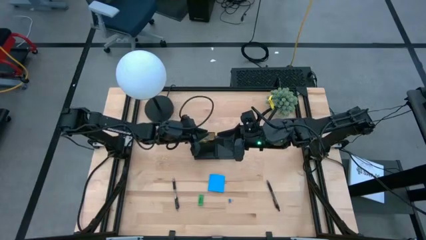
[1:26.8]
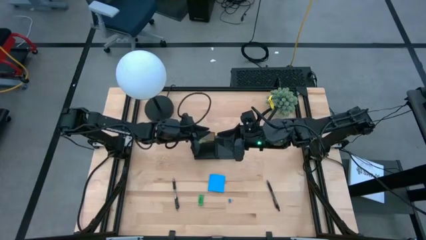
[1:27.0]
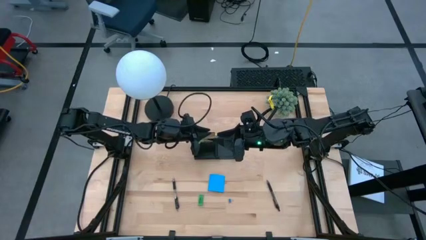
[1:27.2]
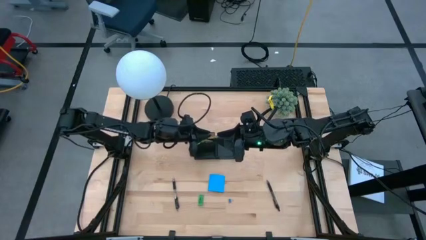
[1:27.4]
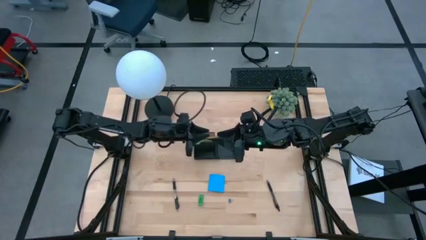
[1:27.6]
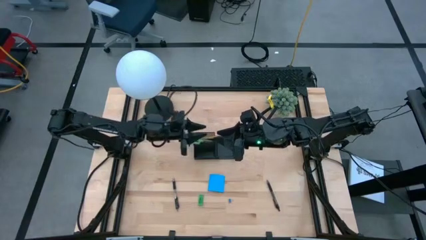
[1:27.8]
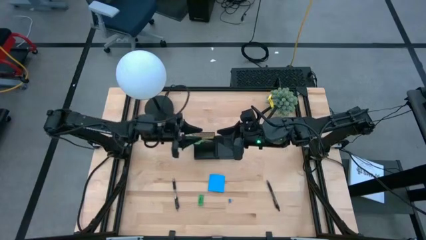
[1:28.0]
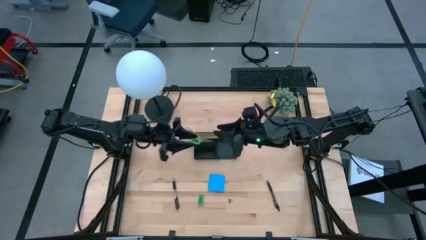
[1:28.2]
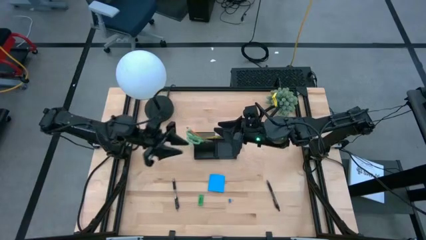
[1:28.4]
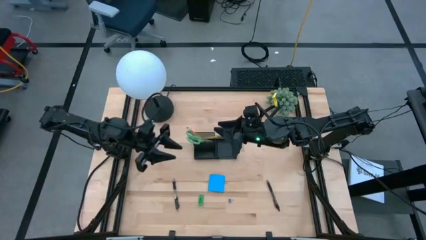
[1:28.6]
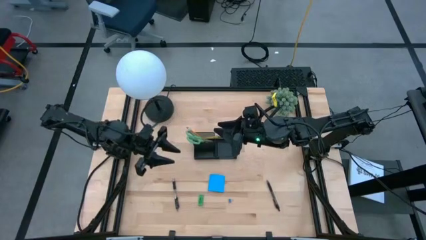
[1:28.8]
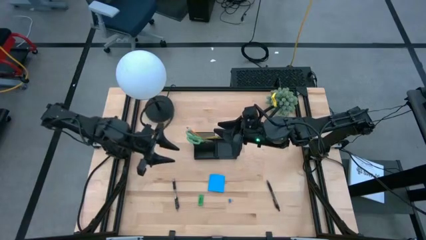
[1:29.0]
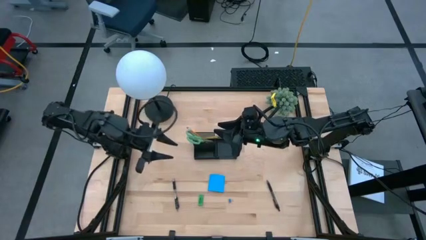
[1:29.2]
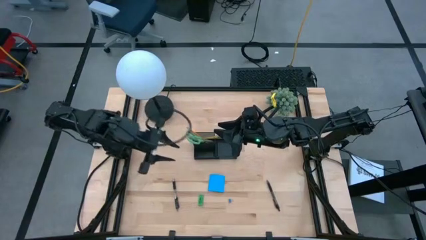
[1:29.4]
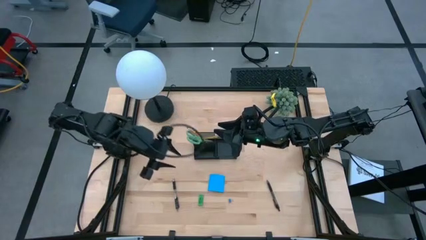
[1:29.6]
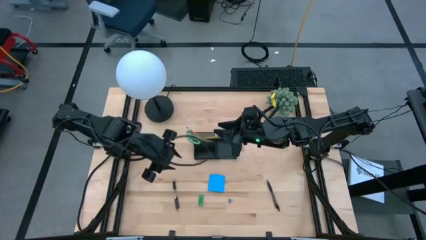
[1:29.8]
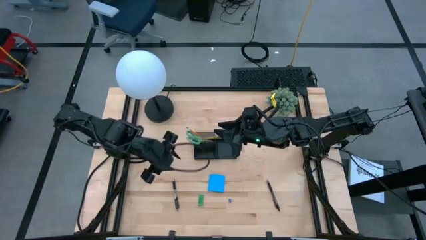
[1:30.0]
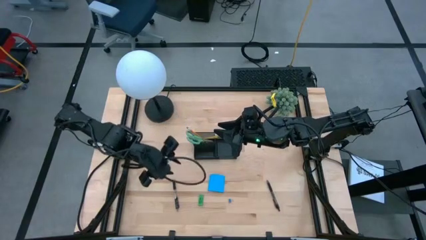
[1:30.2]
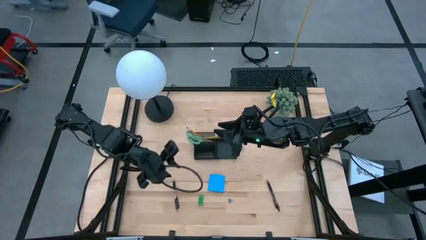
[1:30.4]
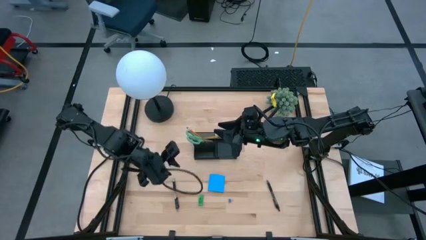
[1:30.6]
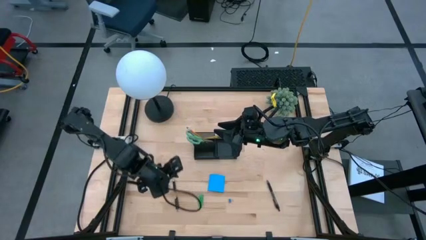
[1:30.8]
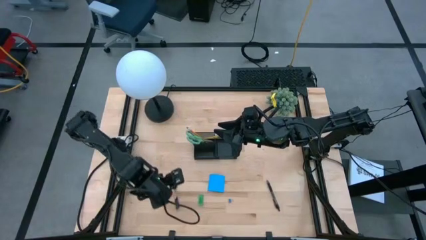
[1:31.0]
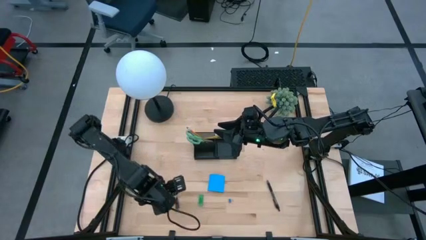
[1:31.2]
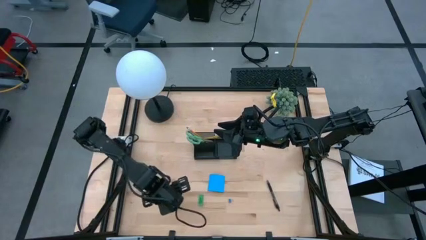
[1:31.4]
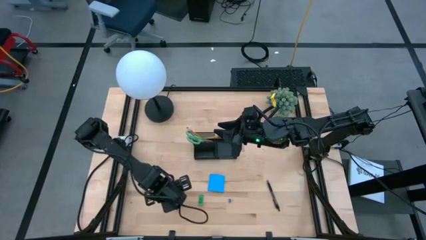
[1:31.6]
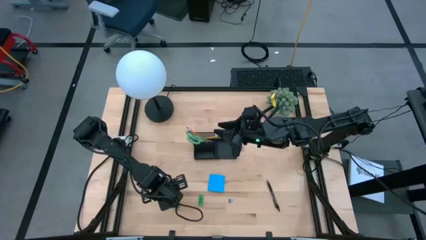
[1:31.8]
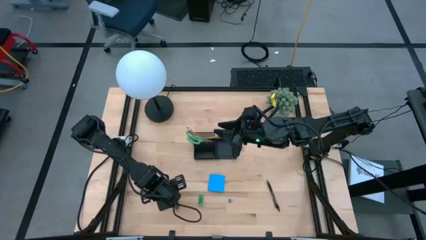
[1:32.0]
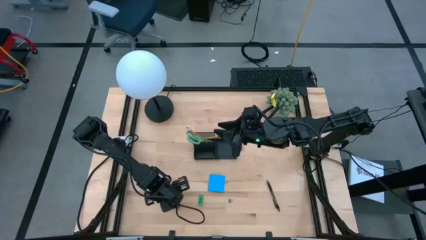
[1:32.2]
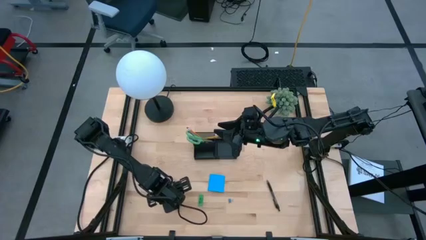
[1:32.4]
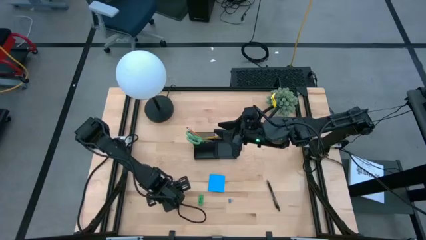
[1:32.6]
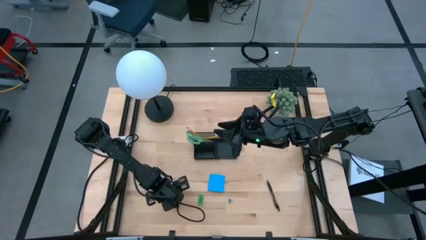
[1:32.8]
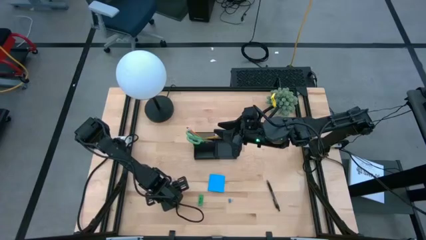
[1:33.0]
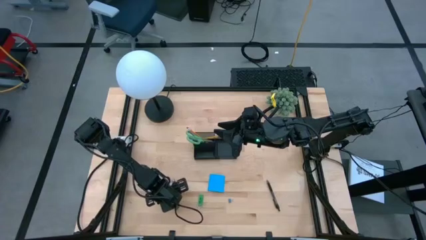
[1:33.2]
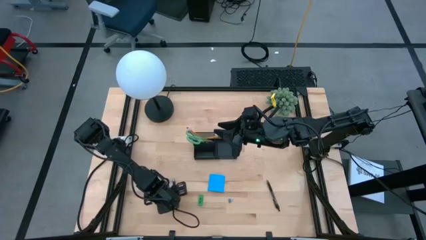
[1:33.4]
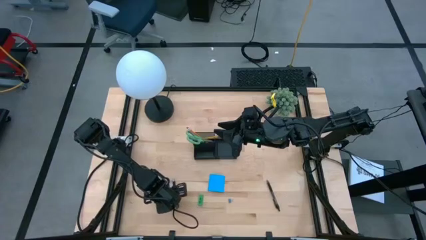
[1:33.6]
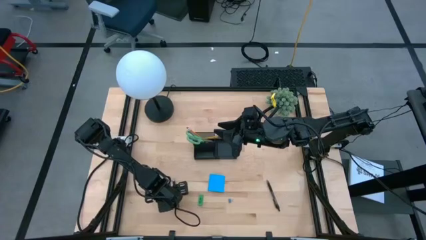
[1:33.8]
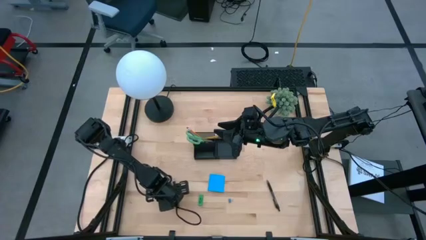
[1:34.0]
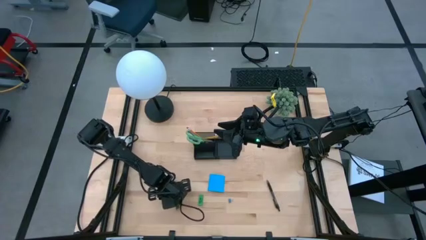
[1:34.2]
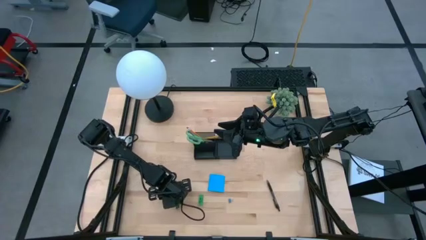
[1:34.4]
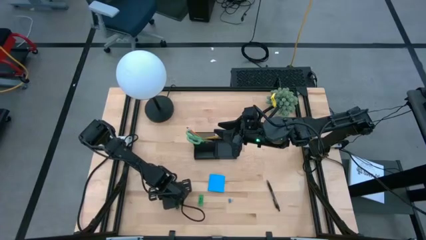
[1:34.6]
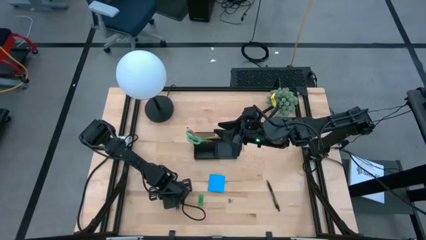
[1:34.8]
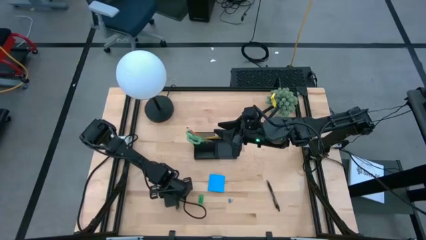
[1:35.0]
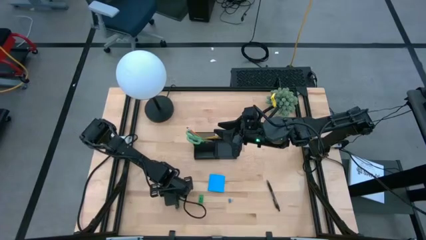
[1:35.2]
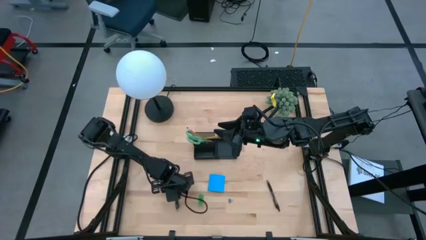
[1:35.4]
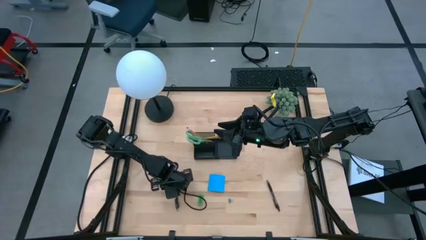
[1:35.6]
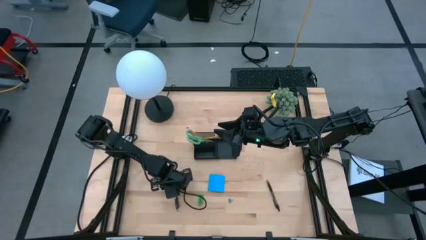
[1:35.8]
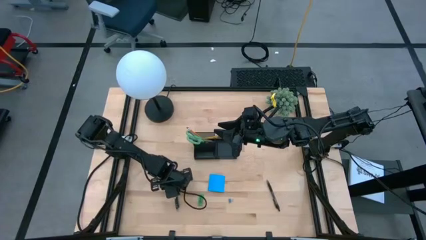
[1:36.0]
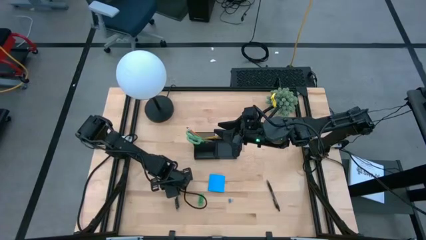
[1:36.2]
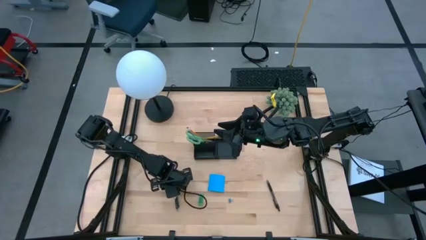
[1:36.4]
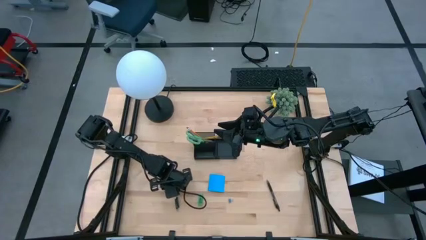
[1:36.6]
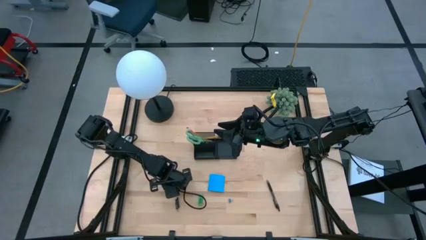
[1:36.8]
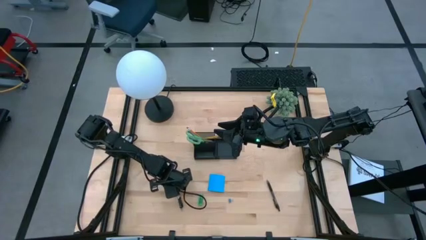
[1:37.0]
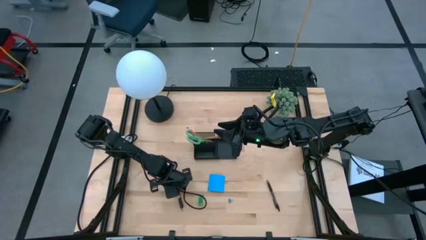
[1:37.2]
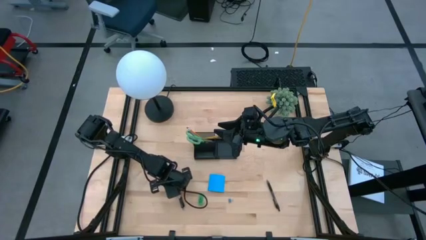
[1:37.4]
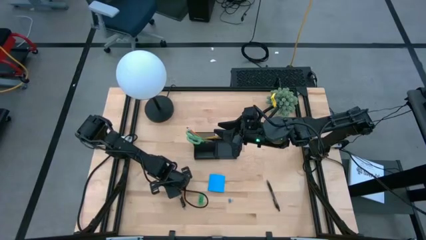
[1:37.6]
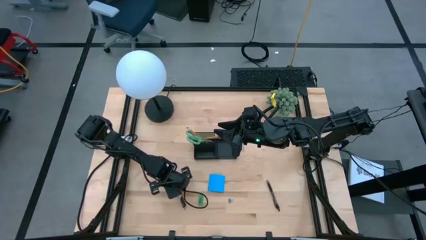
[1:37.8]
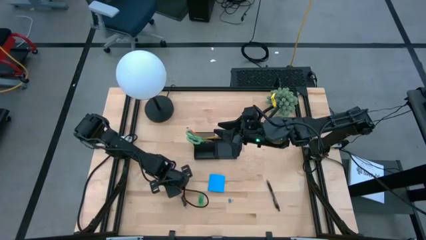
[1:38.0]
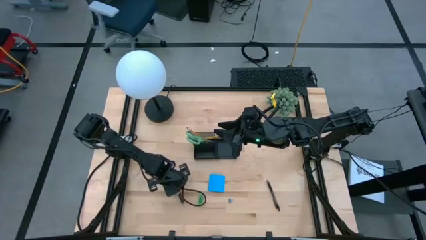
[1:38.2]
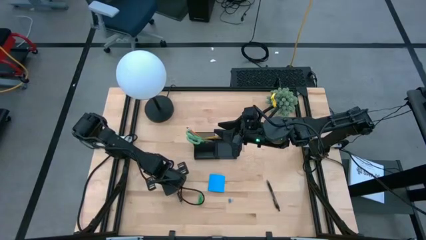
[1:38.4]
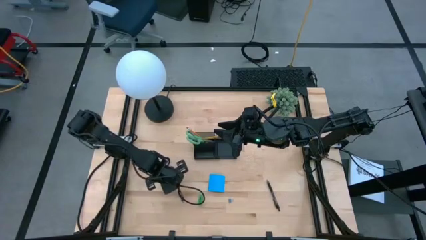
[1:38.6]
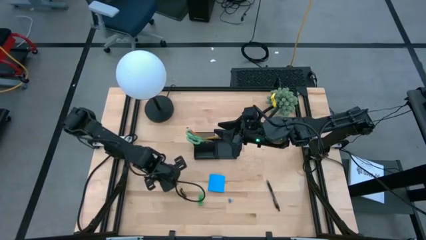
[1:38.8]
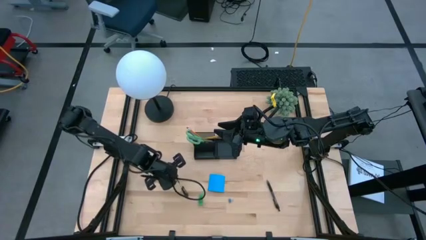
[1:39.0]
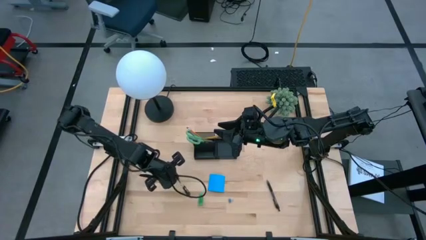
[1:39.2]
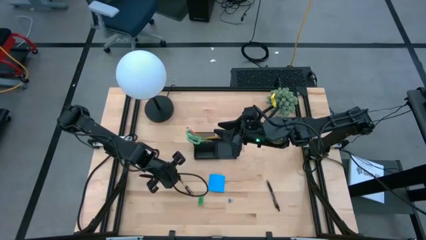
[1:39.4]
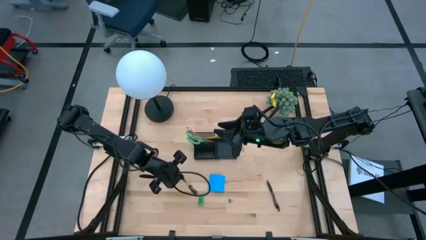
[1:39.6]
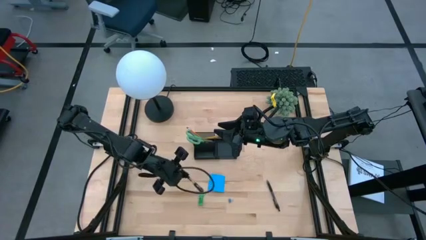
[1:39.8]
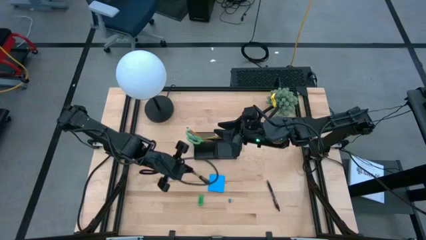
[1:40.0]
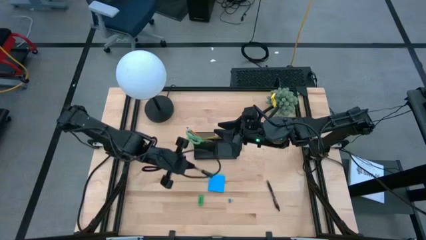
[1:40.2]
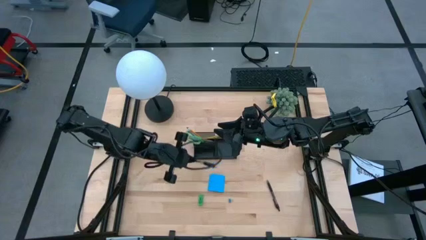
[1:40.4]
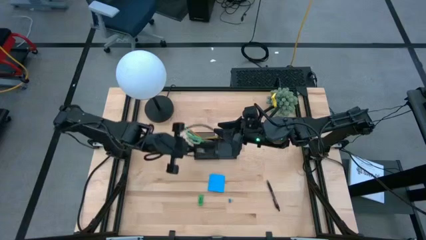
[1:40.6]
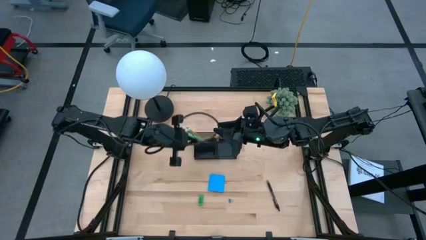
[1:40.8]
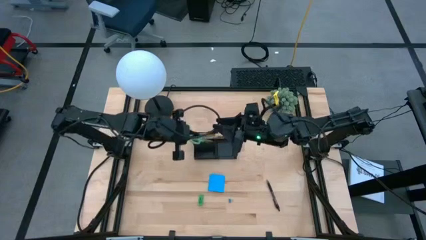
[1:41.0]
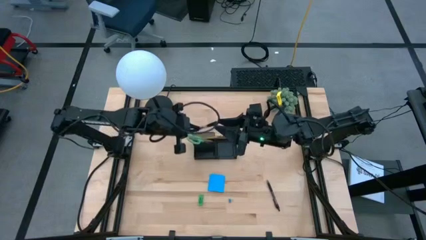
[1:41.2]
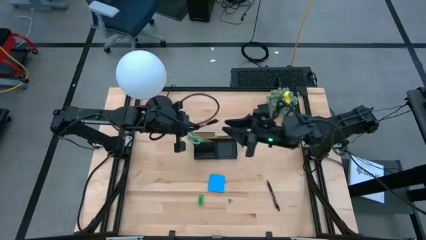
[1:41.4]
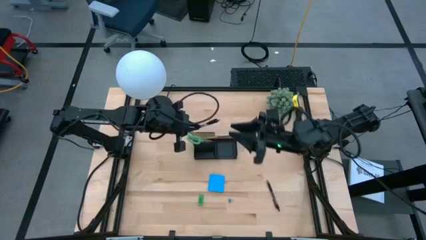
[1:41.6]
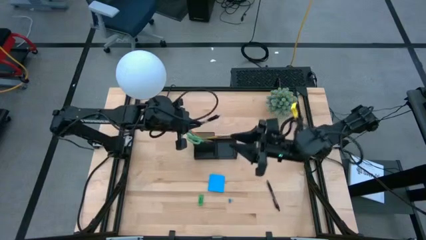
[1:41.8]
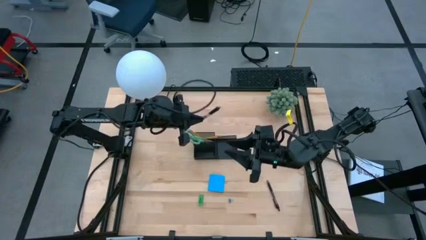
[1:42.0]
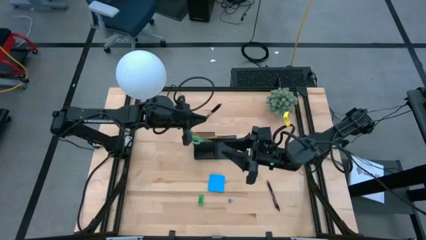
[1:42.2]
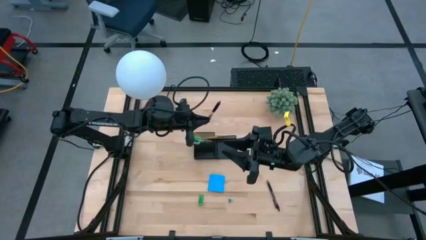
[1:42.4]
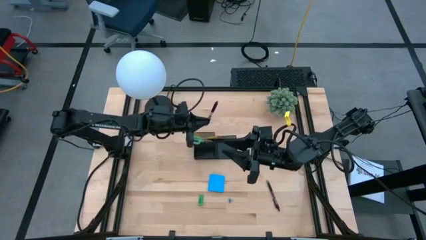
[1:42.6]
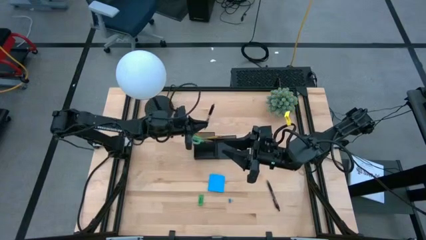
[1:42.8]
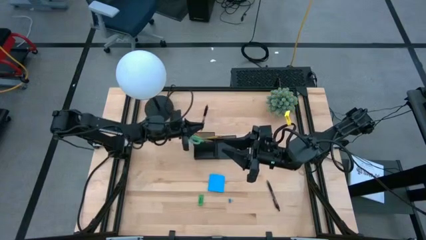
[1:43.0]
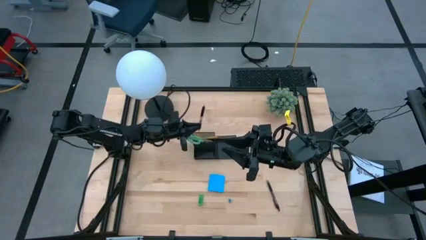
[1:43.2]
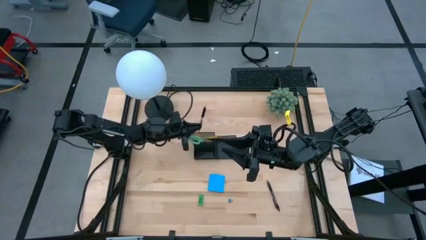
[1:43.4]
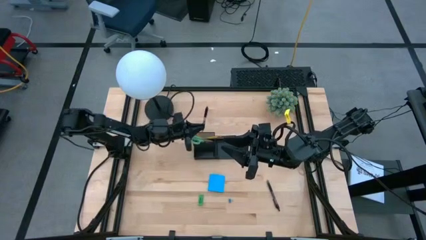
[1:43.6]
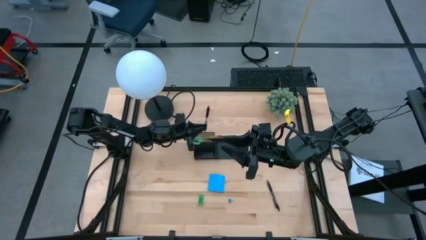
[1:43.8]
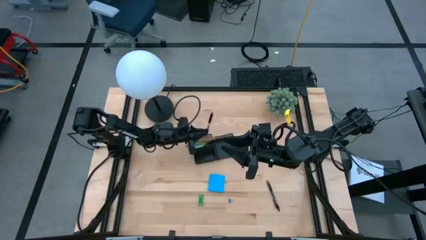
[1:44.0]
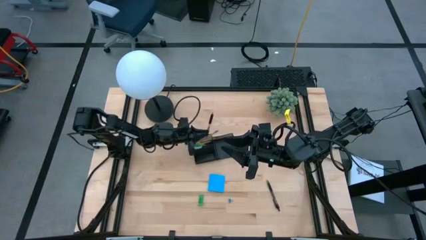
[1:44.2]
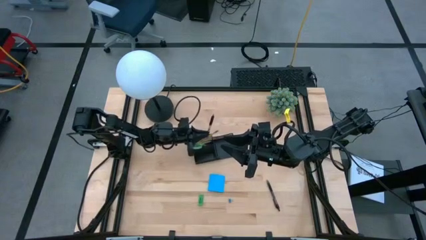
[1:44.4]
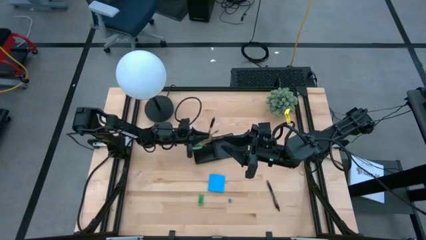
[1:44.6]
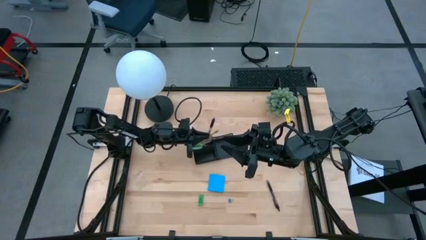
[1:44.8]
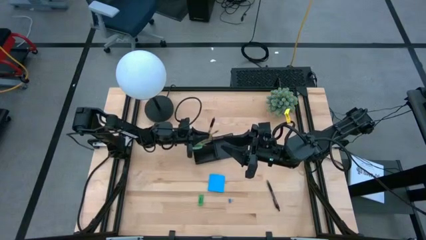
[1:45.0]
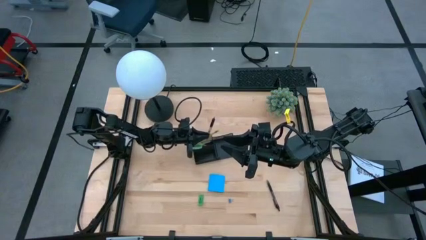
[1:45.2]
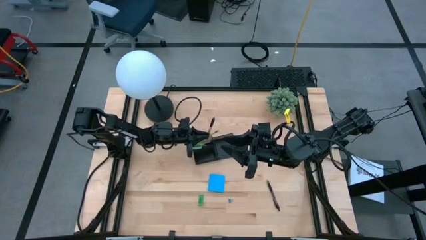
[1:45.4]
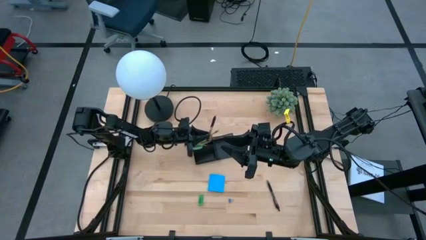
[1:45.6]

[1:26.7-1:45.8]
Task: Pick and place office supplies into organizer
Put the left black pen into the black desk organizer
